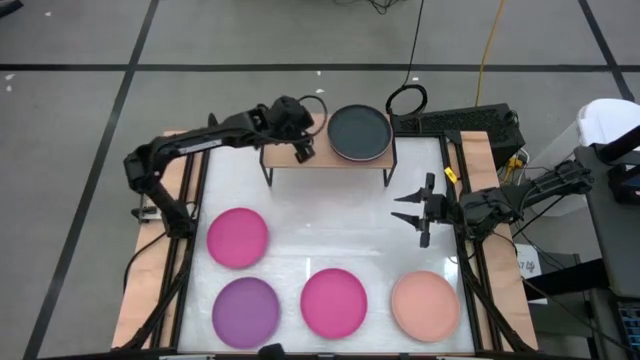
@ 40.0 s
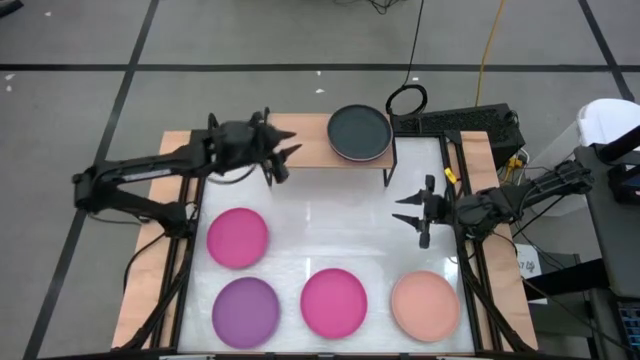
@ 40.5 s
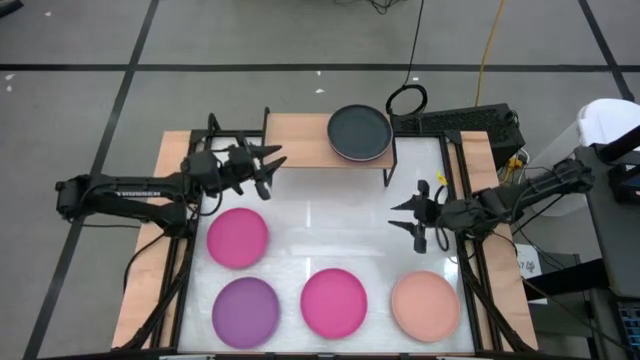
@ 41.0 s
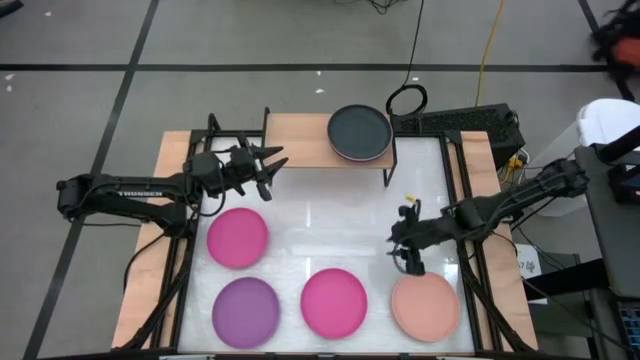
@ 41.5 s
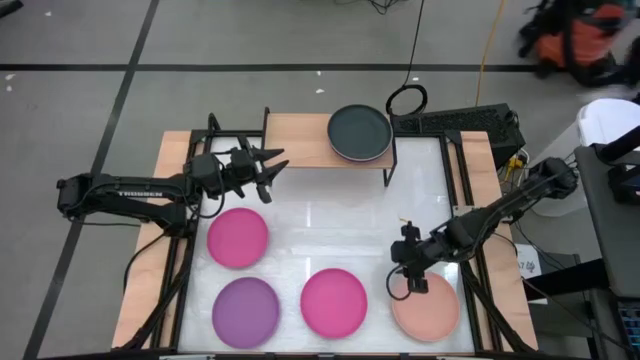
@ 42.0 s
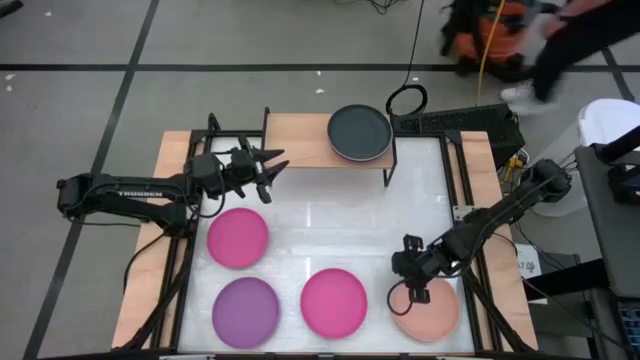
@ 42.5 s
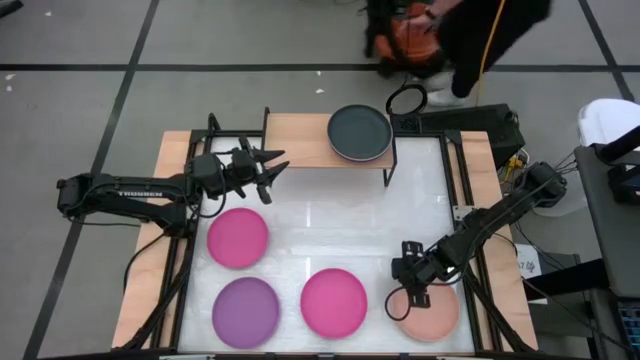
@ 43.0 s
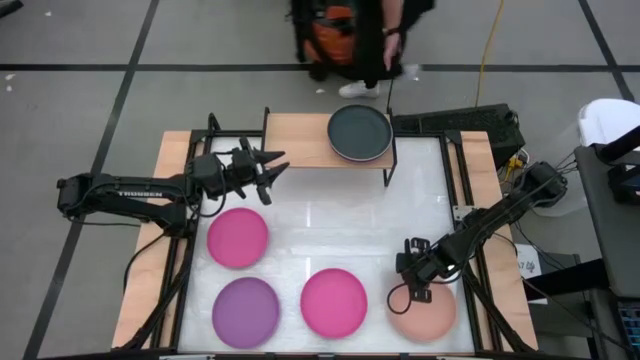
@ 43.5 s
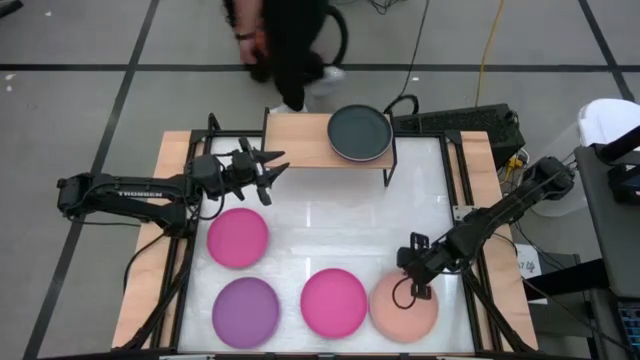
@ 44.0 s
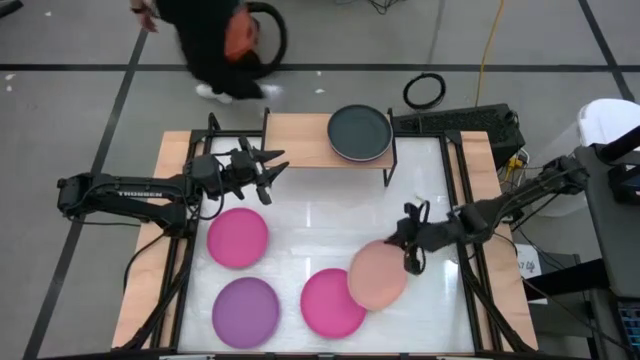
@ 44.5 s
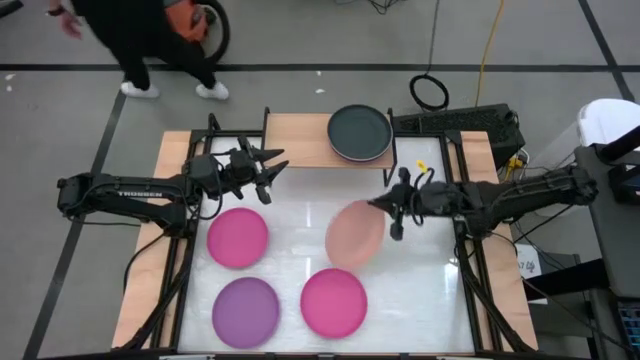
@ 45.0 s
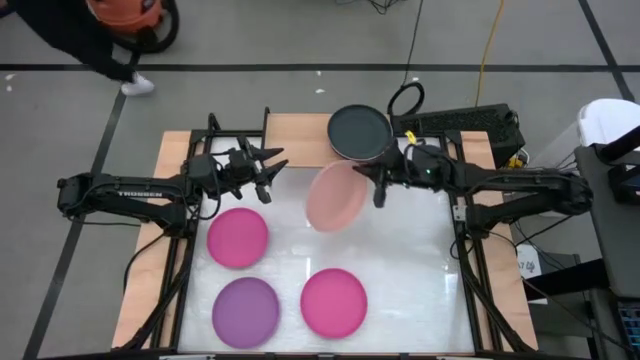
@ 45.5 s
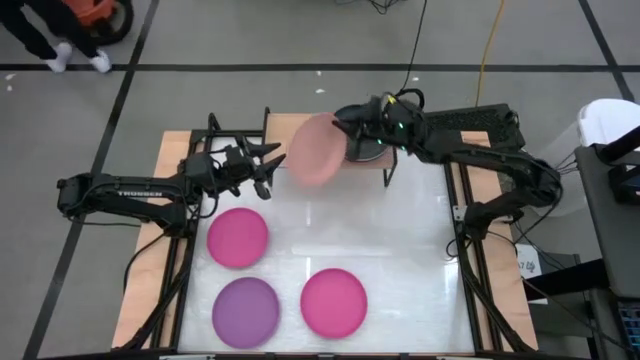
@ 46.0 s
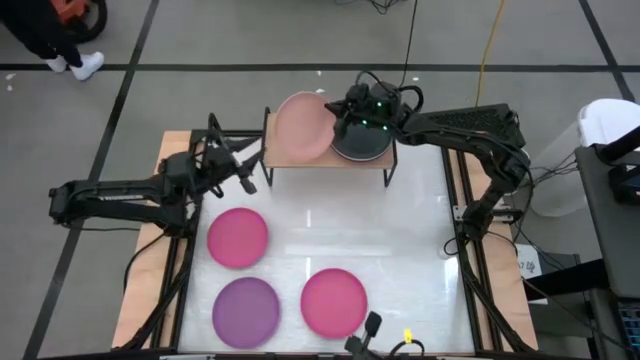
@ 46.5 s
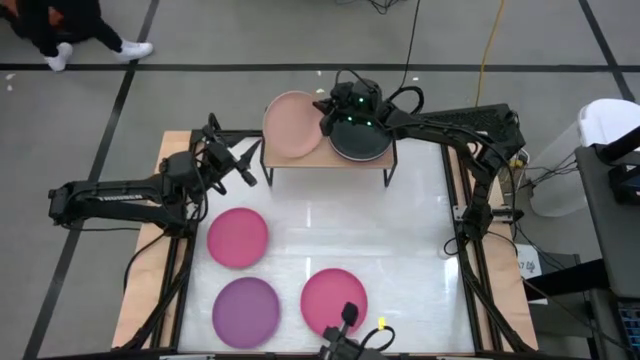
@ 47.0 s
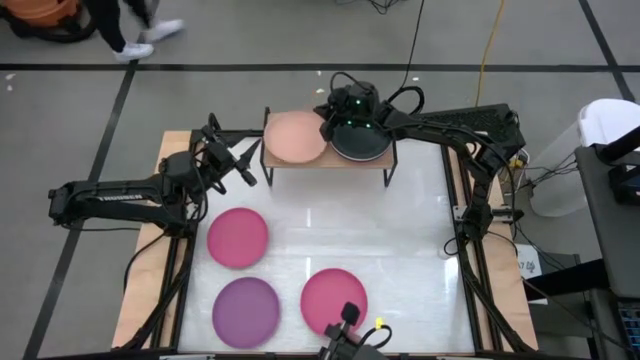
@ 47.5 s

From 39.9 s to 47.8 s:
Task: Place and stack plates onto a shelf
Put the light pink plate on the shelf

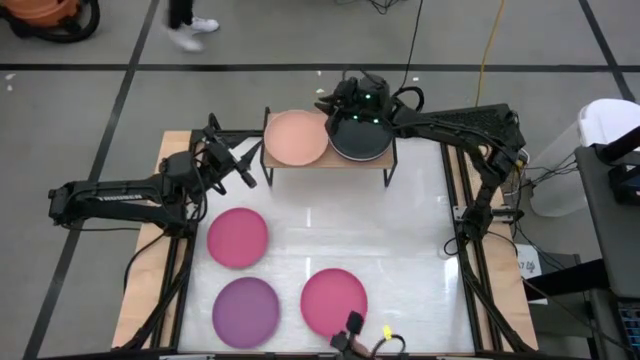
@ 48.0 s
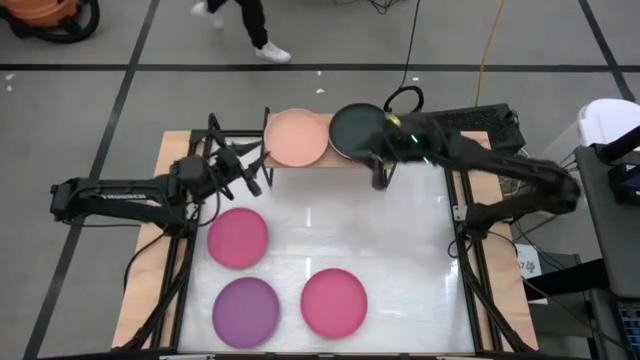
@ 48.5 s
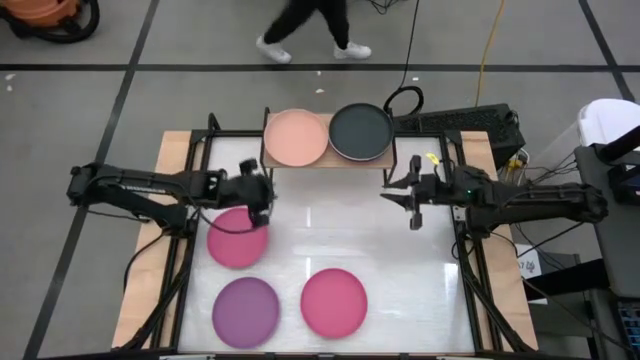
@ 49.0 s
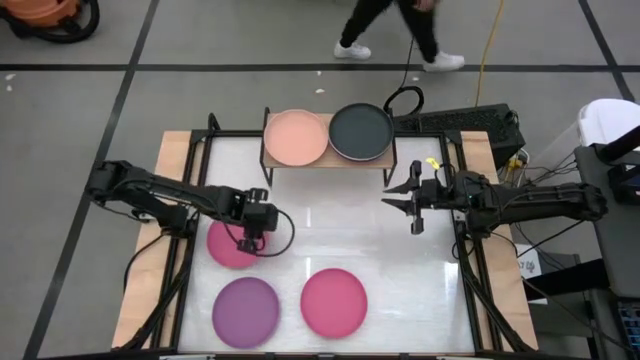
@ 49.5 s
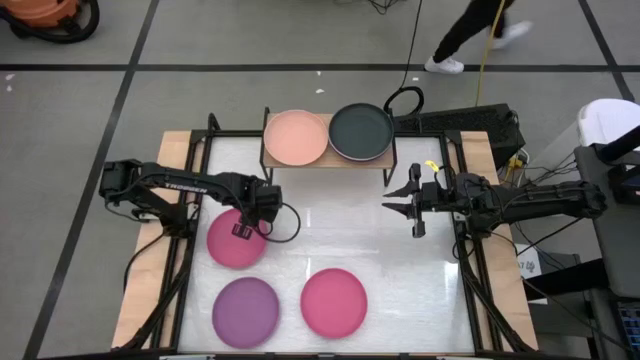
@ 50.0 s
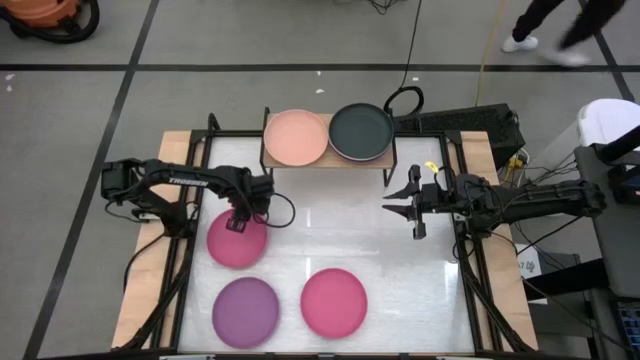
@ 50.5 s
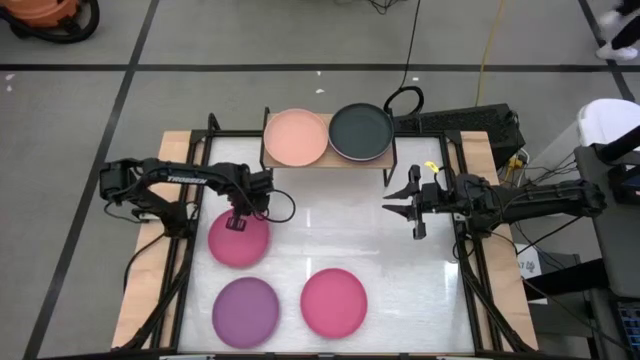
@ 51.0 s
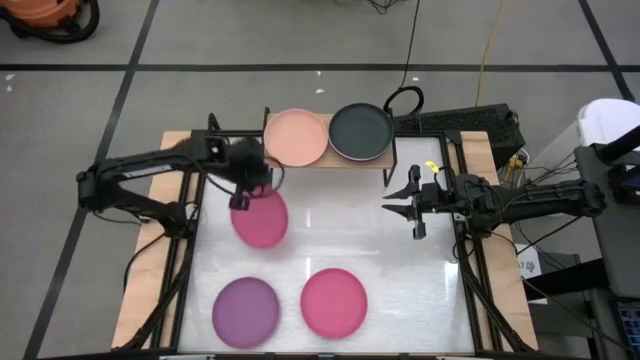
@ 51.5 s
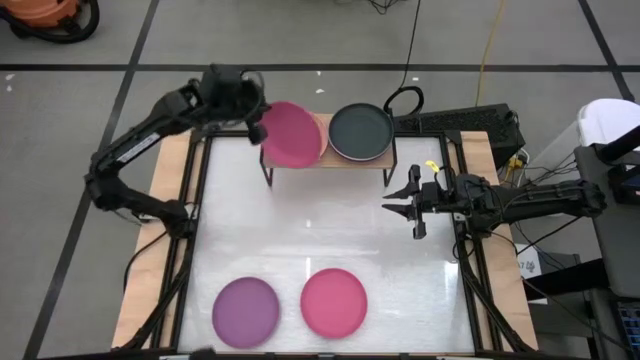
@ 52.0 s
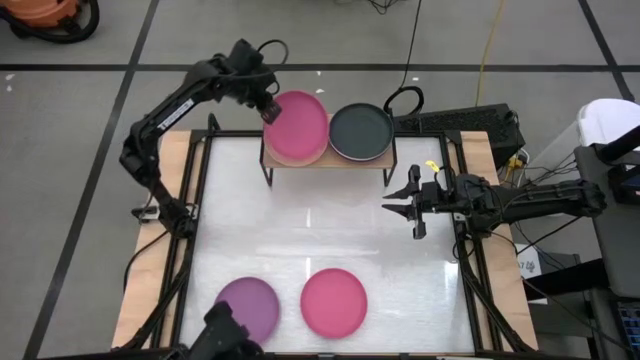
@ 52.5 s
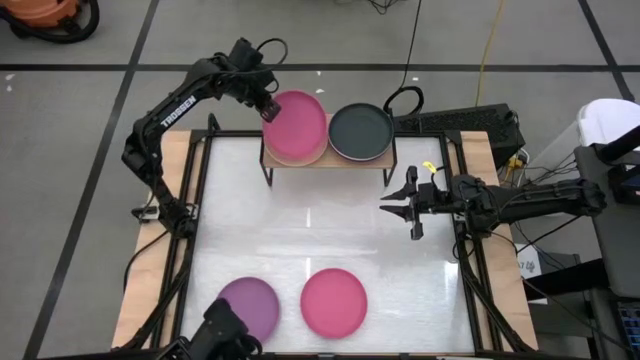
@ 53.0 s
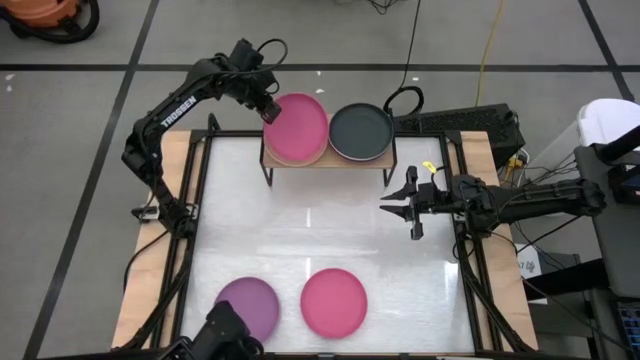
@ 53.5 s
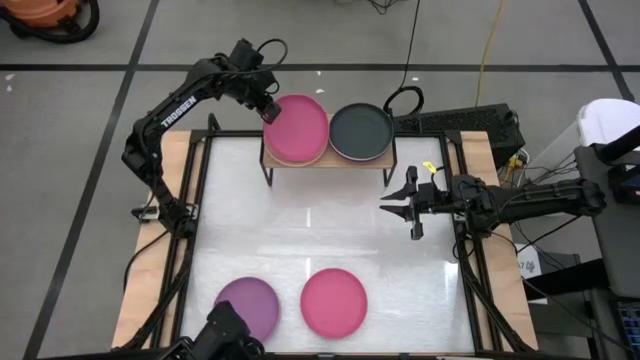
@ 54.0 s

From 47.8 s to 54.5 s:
Stack the top pink plate on top of the light pink plate on the shelf

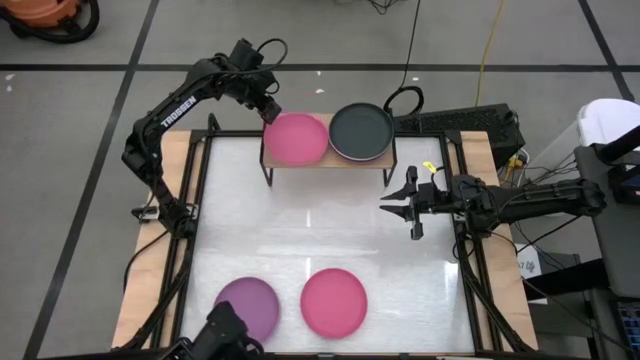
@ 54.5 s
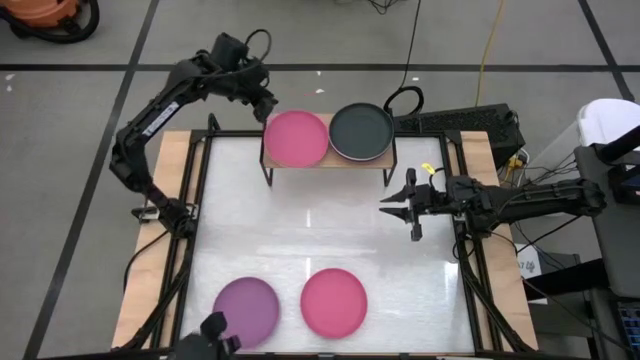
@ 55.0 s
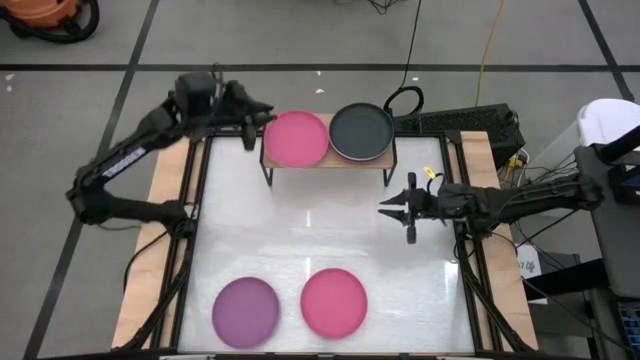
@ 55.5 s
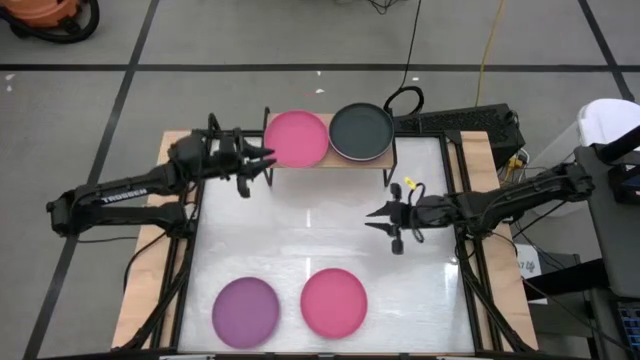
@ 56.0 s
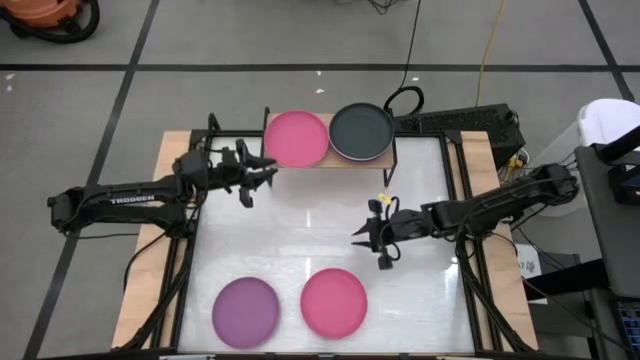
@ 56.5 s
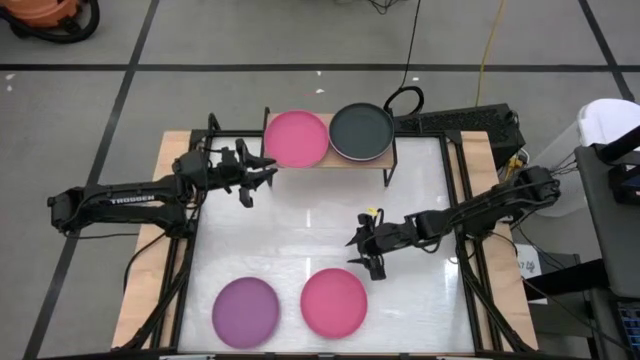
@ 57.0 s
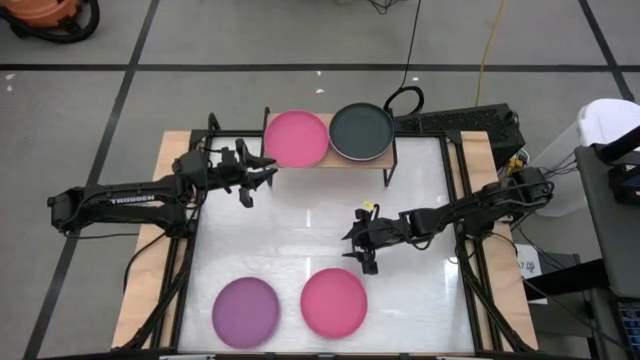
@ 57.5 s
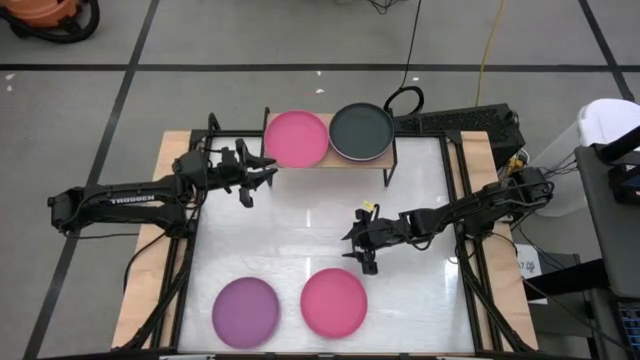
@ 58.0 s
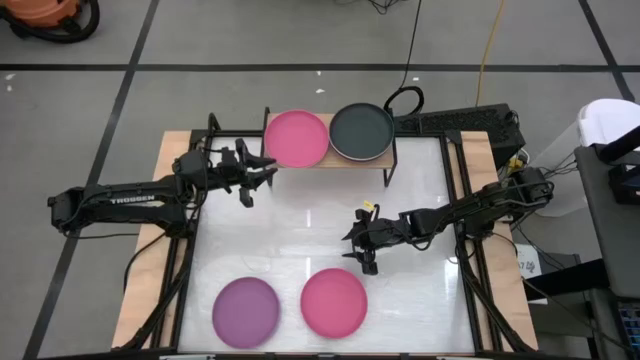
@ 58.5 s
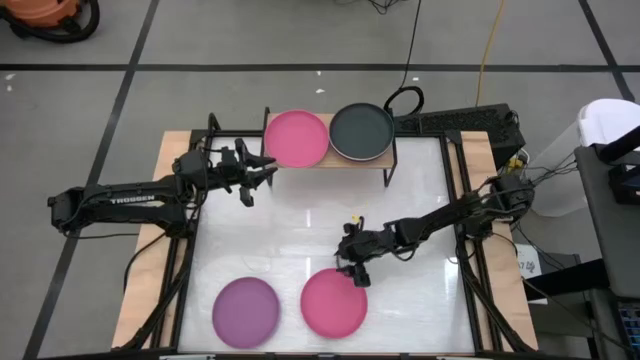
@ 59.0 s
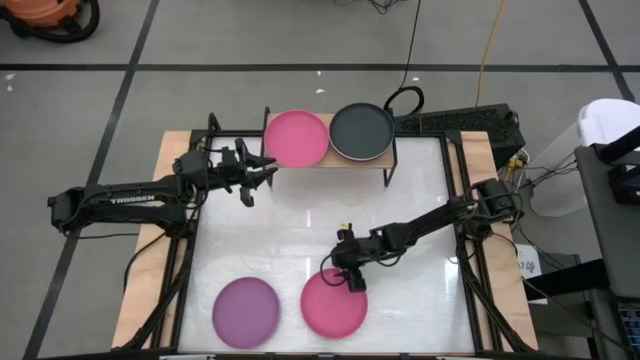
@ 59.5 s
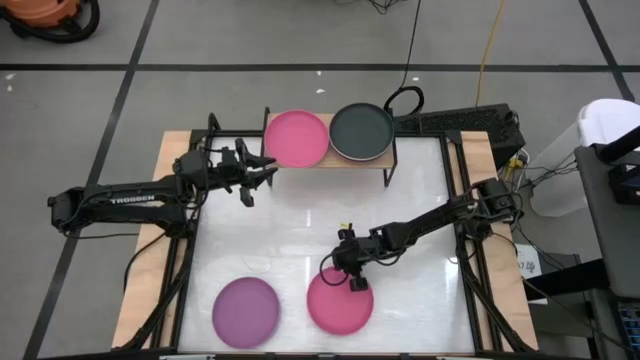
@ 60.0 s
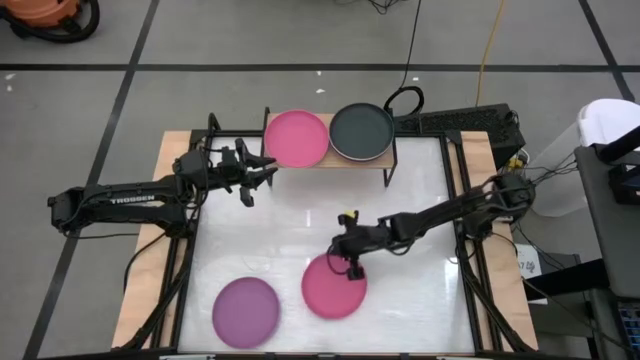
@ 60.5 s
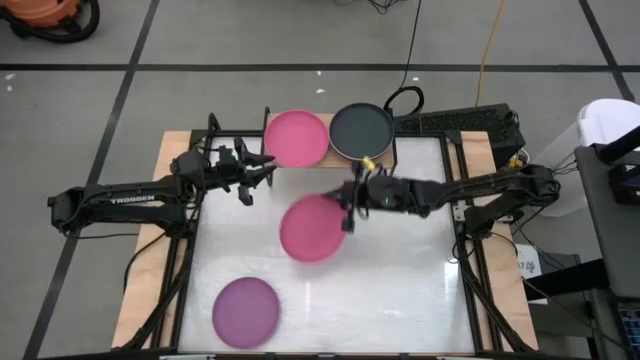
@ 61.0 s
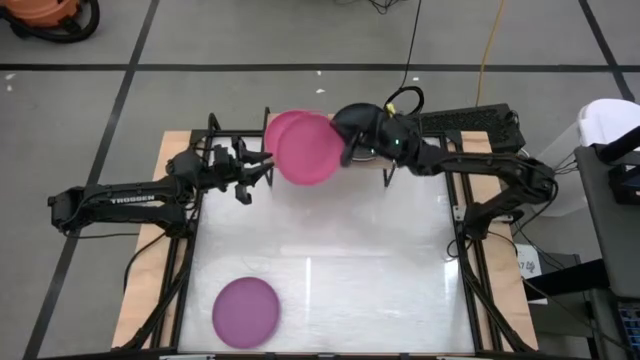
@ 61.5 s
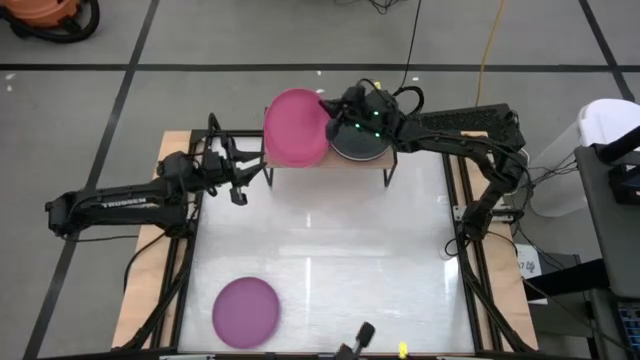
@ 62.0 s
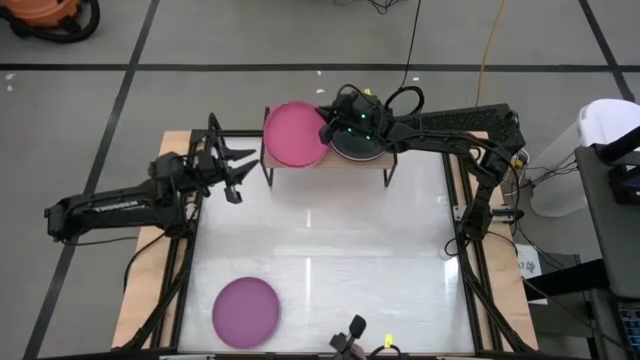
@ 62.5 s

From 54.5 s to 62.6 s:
Stack the pink plate on top of the pink plate on the shelf
